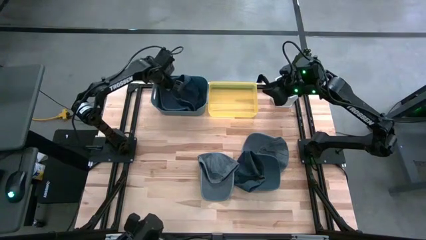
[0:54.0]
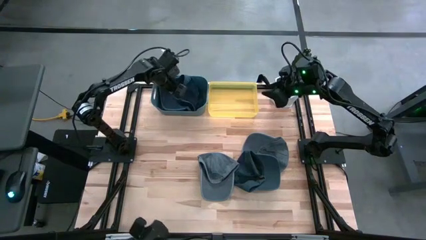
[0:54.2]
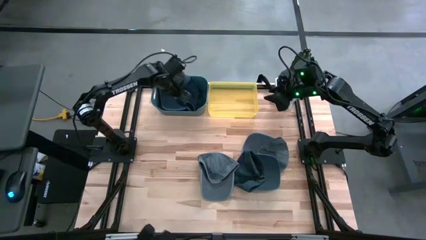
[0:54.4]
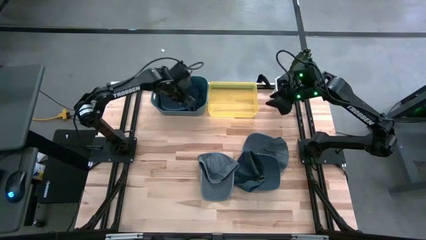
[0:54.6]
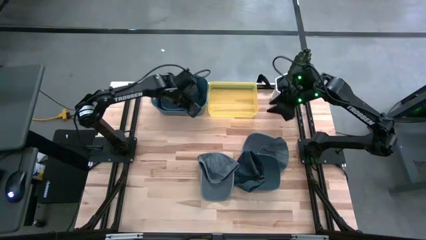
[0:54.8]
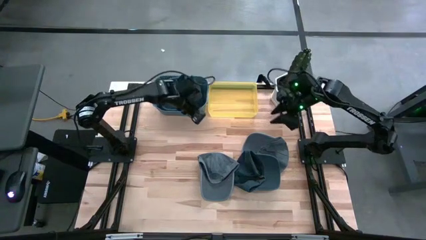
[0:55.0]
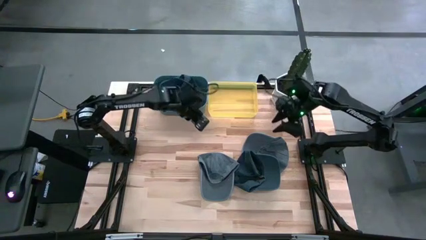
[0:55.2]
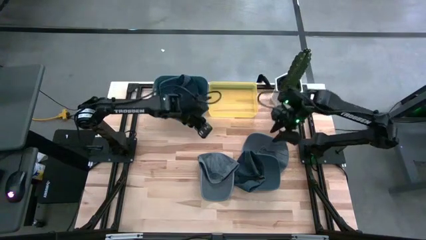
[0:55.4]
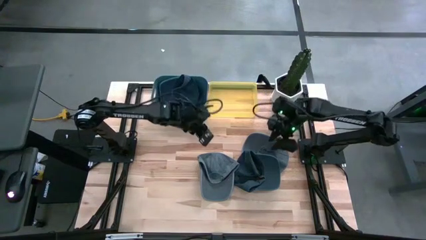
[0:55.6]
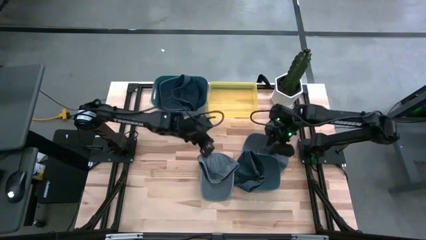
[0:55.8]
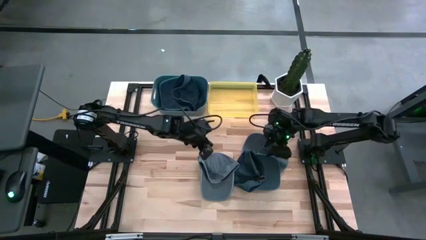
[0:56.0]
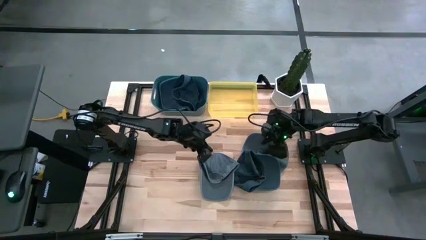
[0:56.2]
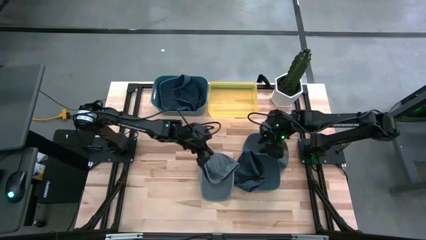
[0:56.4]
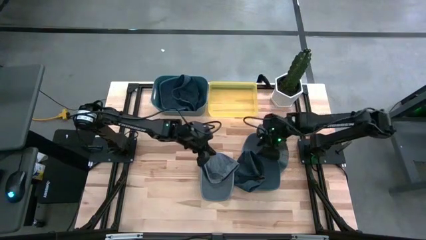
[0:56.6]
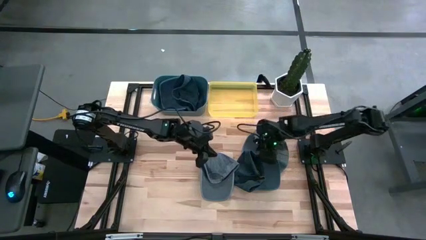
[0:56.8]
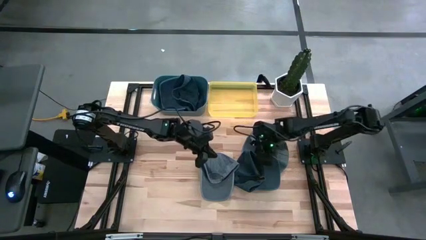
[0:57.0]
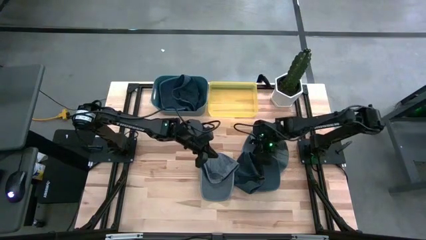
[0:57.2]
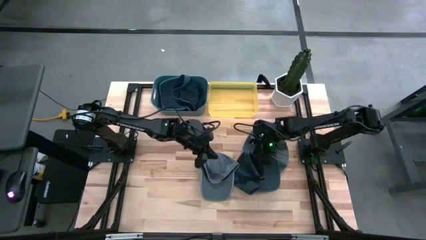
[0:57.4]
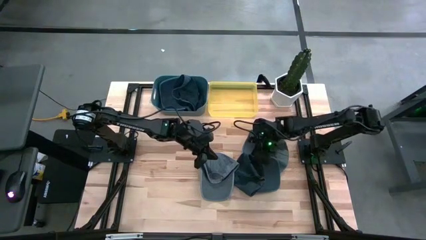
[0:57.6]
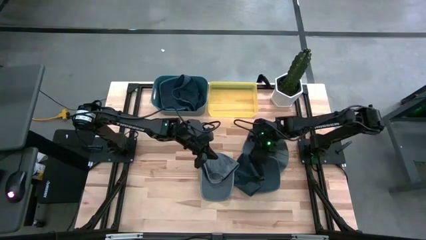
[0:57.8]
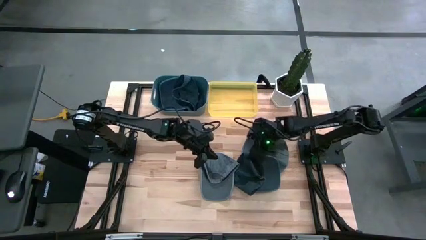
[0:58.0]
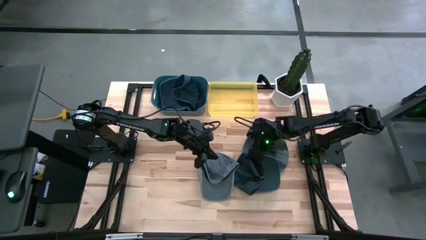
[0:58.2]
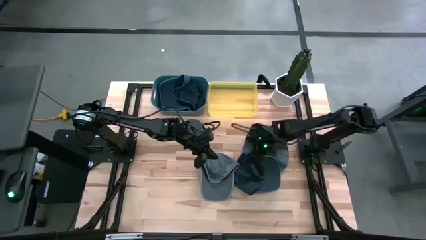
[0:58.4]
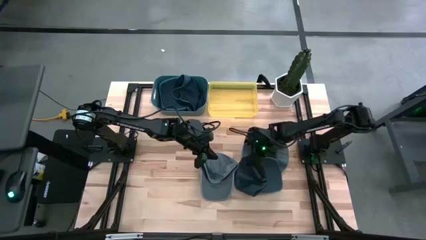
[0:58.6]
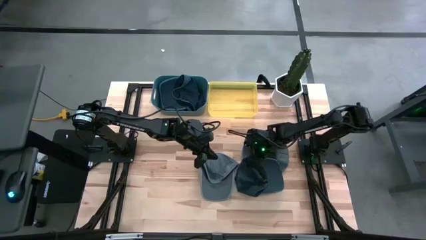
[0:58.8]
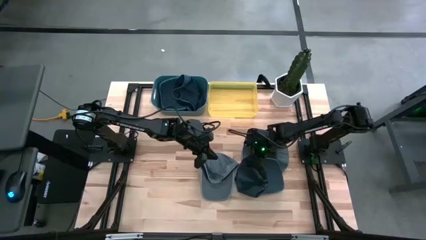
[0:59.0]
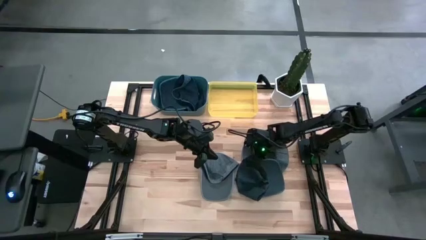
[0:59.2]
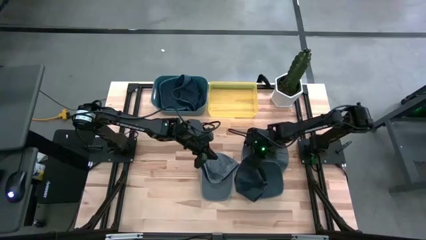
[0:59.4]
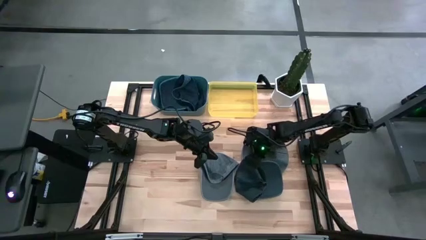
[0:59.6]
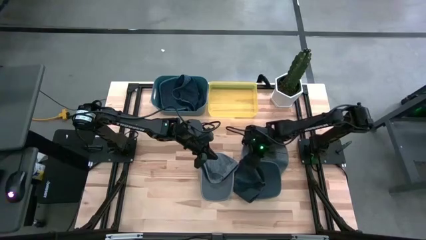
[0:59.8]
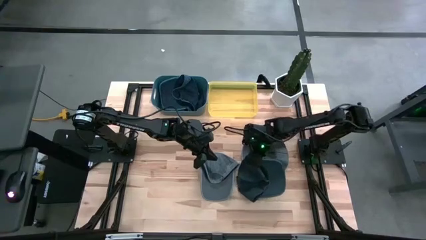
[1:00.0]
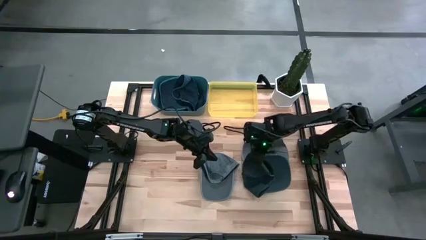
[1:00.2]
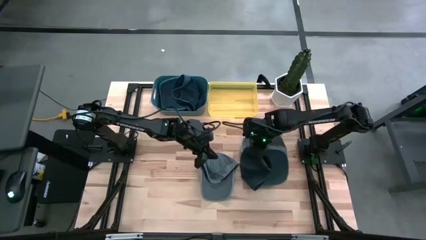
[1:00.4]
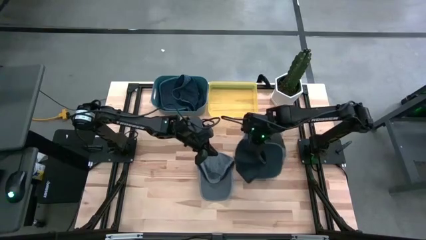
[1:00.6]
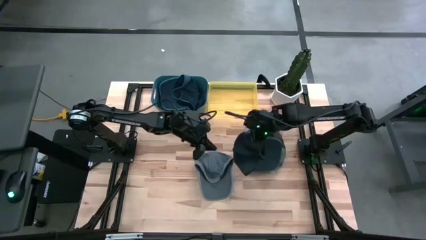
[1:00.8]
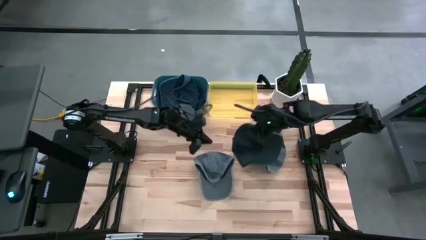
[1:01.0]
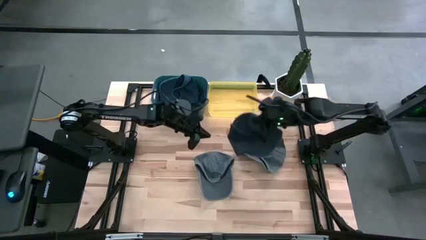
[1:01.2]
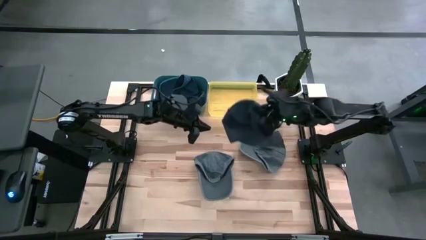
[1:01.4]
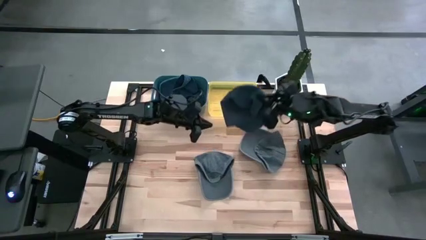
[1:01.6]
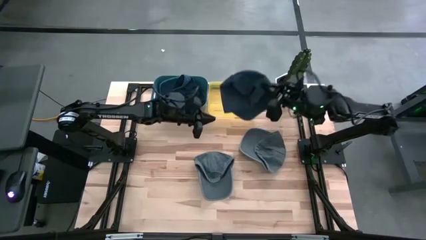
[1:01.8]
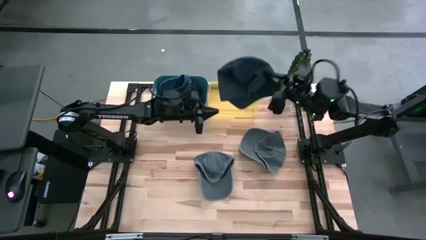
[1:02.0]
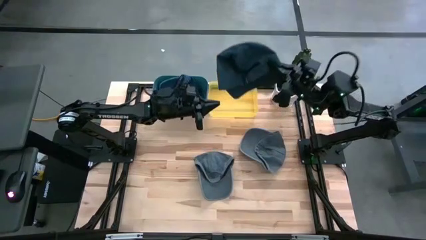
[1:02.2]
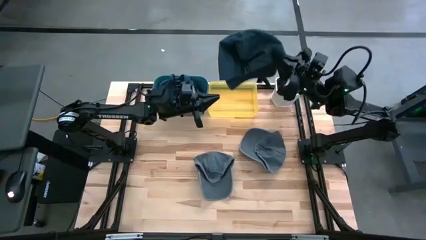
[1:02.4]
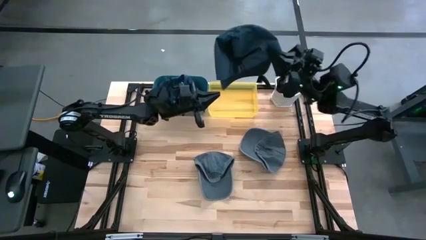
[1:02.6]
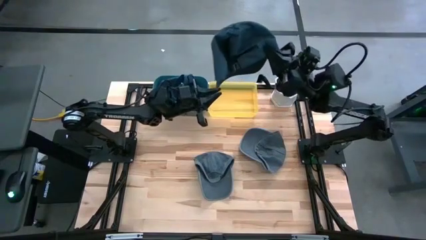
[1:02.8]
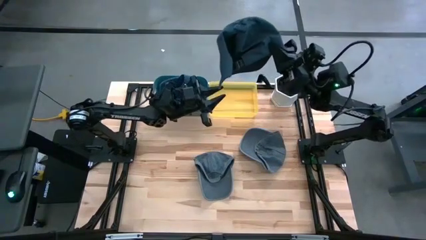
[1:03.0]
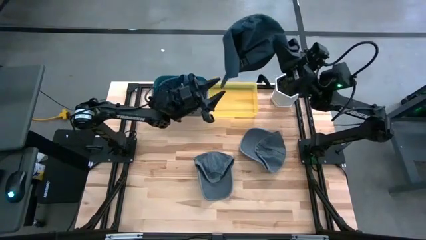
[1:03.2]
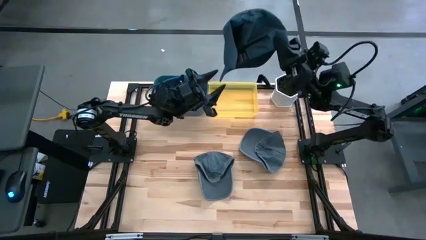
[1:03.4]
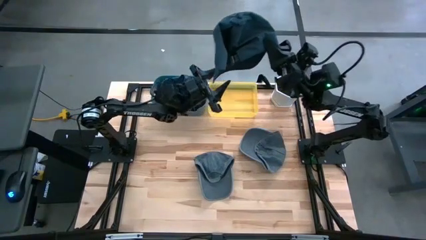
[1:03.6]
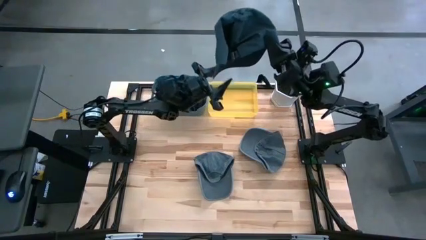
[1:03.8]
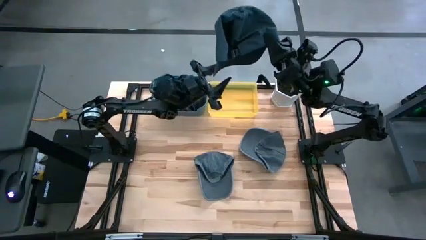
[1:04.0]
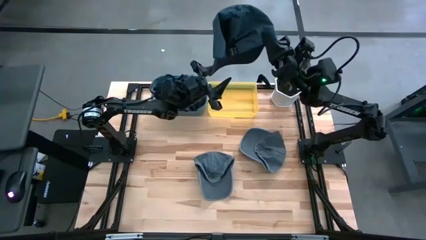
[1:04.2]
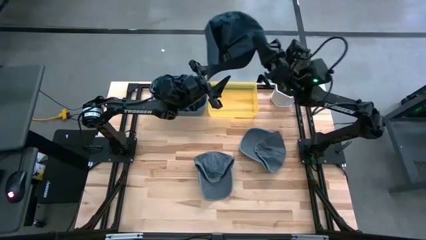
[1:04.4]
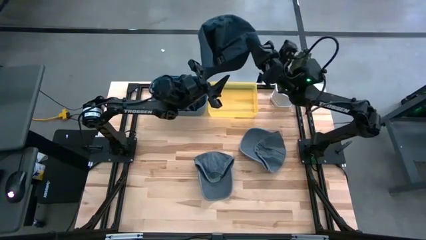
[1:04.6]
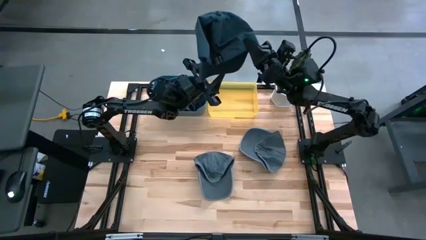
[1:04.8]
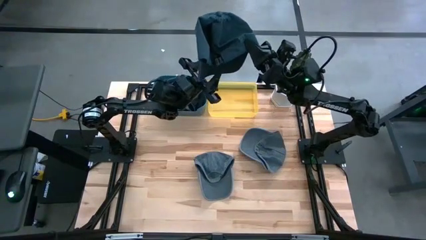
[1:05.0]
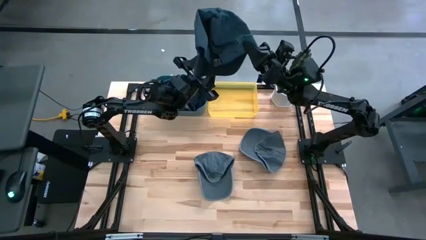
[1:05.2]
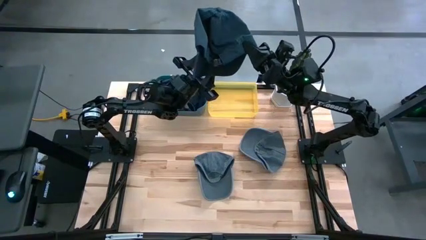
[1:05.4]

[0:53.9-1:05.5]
Task: Pick & Place hat
Put the blue cap into the blue bin

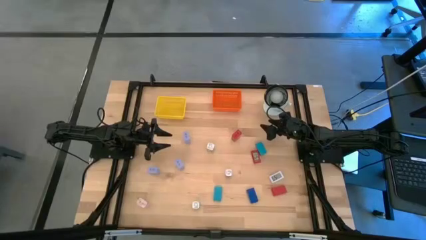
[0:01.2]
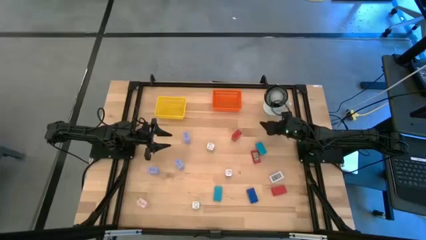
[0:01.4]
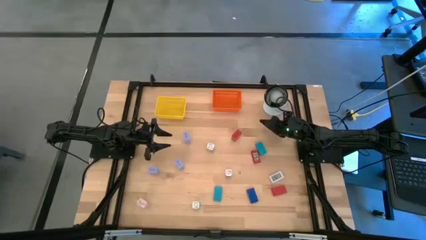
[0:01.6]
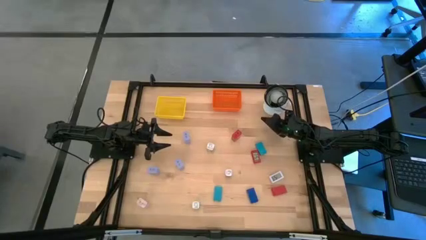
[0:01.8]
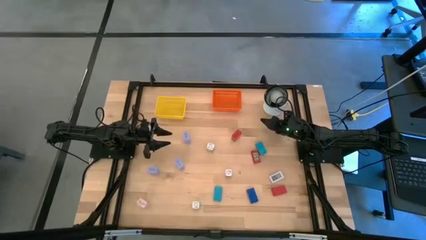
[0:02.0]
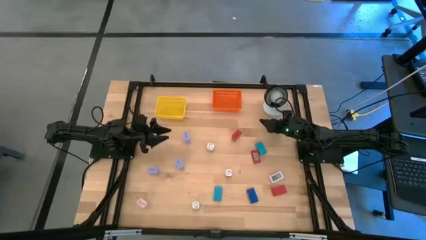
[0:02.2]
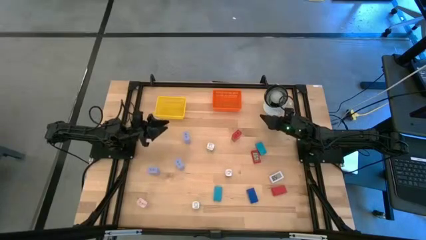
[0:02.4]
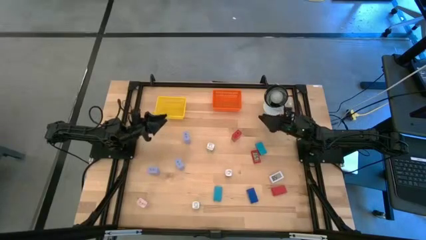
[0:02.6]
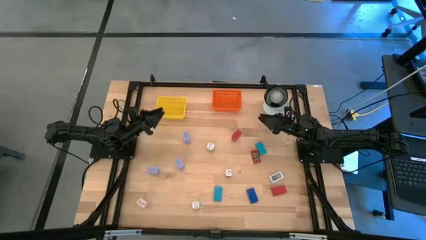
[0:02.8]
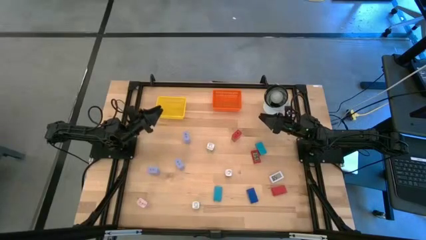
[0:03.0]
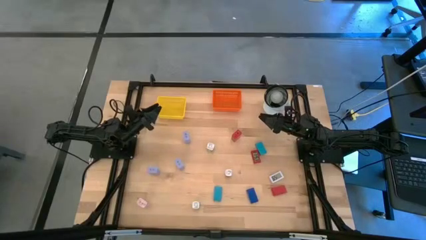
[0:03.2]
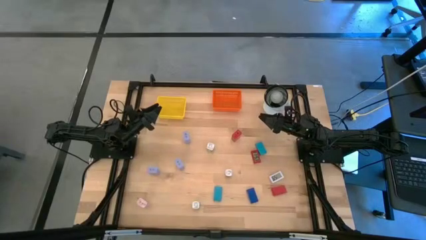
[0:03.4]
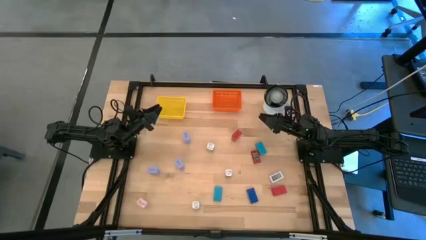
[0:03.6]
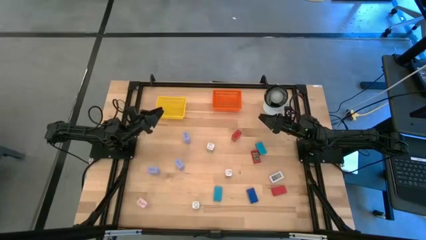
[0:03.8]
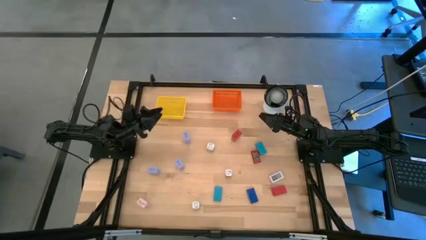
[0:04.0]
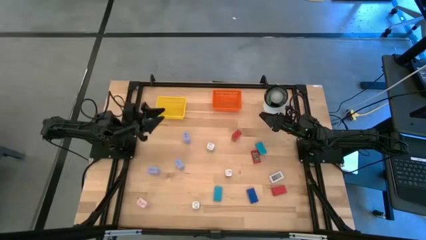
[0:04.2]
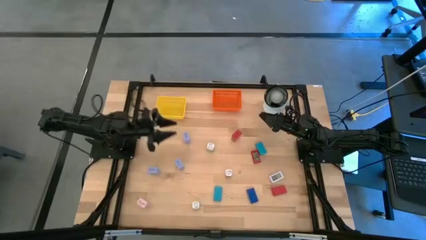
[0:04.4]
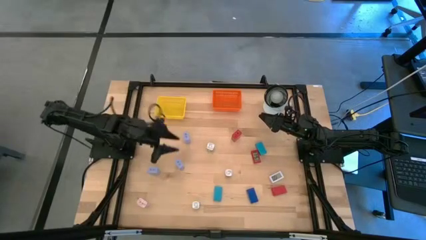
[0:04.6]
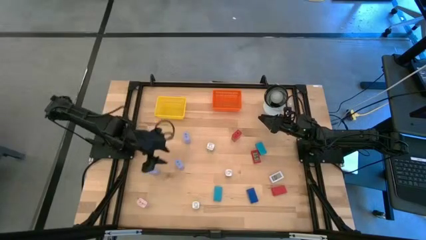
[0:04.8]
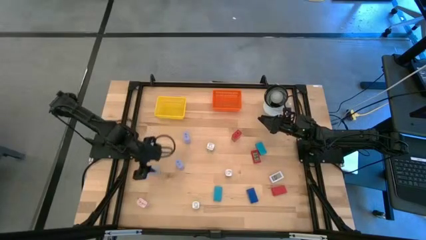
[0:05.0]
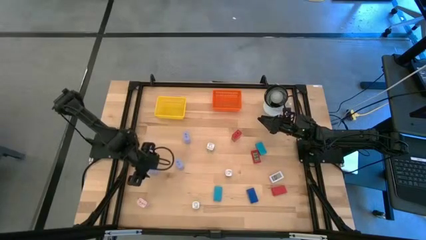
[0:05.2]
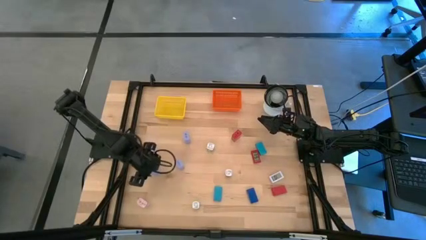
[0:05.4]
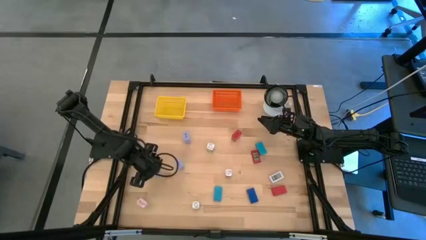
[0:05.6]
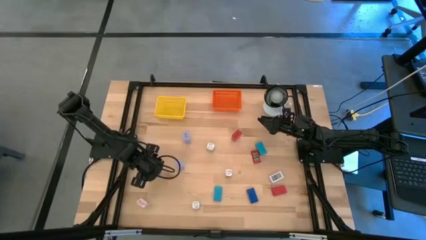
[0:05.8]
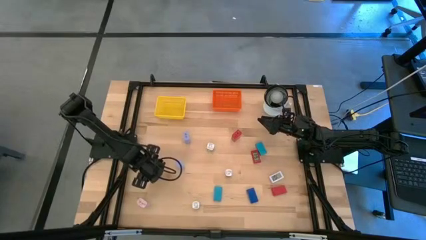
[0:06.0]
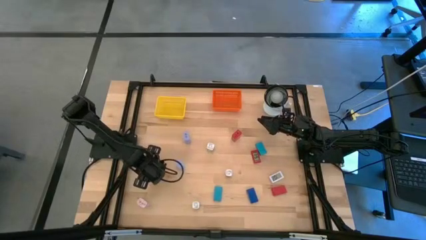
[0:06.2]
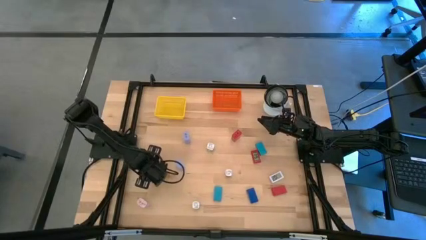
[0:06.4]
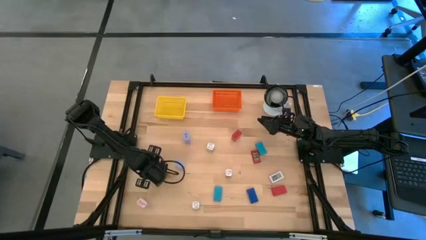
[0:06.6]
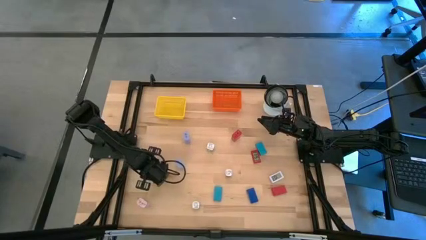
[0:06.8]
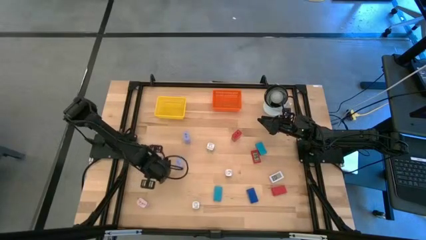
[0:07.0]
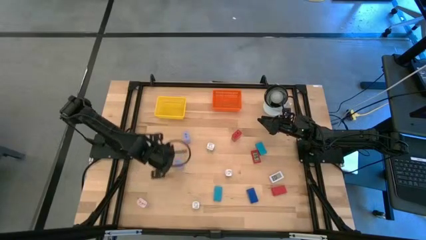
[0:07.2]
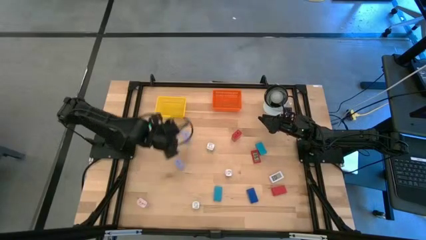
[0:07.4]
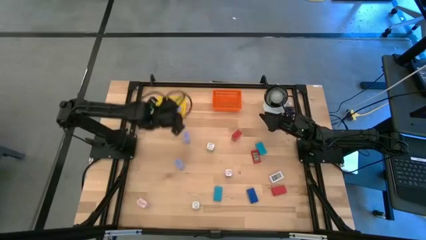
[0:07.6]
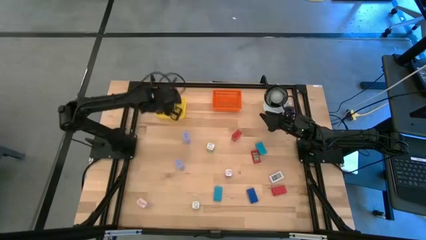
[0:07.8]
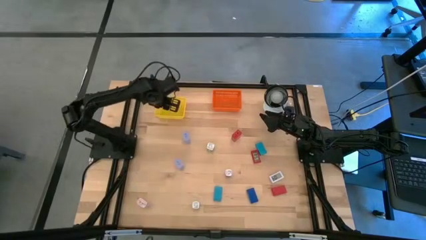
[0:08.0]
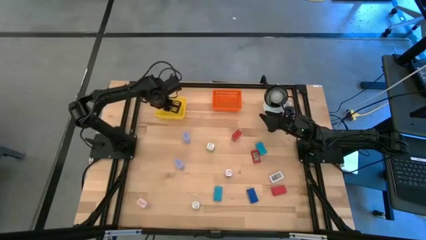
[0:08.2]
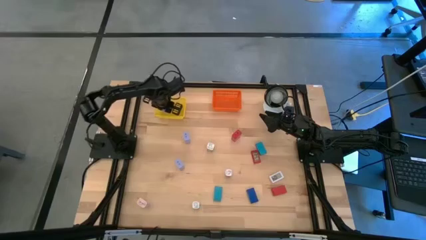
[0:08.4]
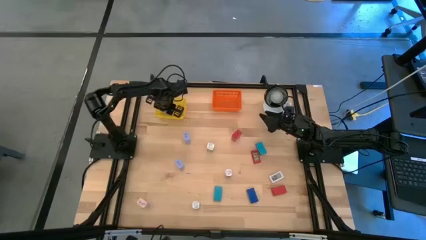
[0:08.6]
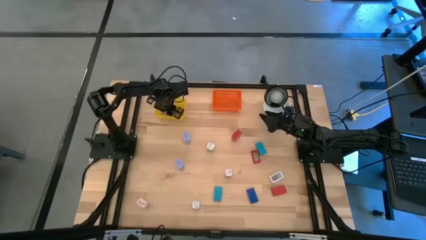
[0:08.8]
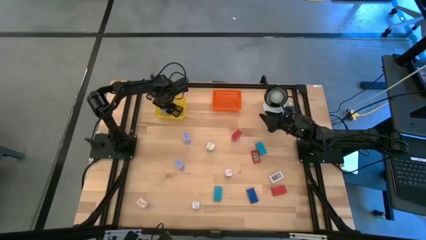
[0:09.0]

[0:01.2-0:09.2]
Task: Pick & Place Office items
Put the bottom left light blue changer adapter into the yellow bin
